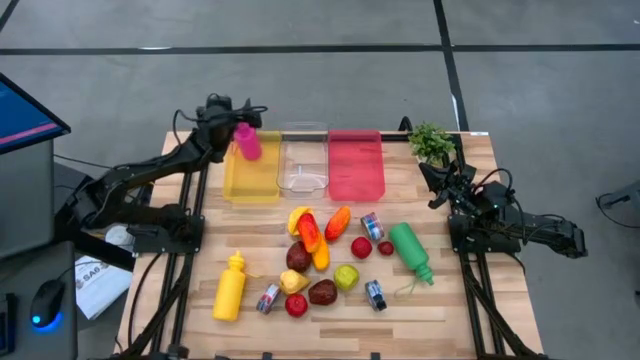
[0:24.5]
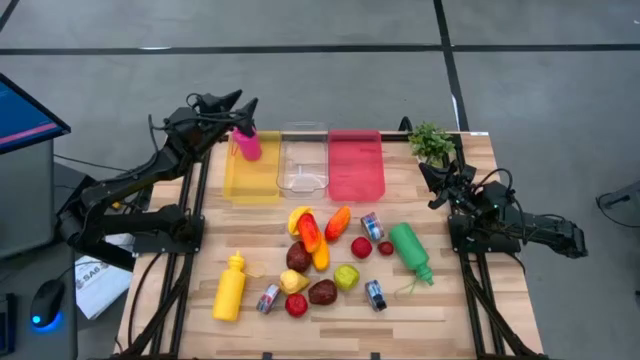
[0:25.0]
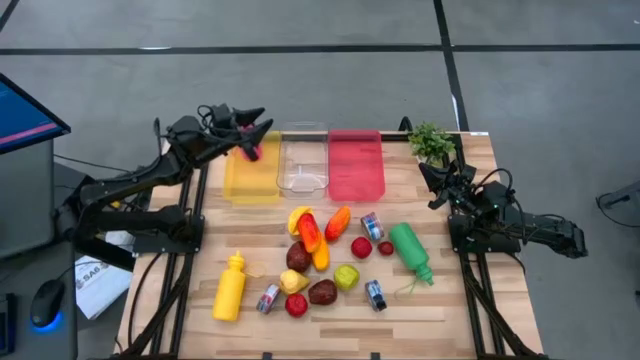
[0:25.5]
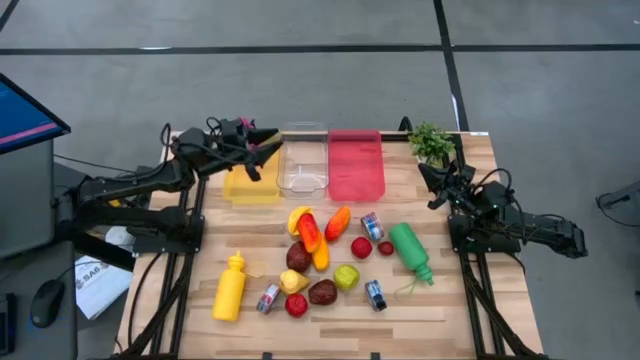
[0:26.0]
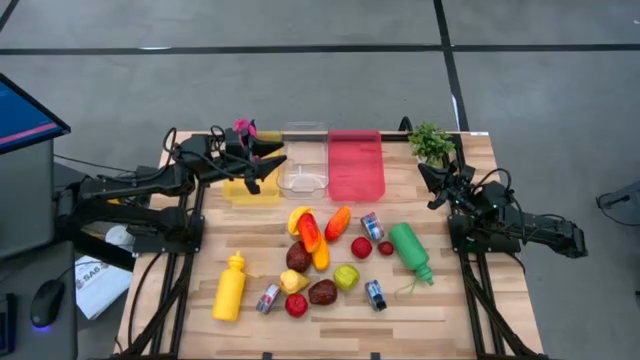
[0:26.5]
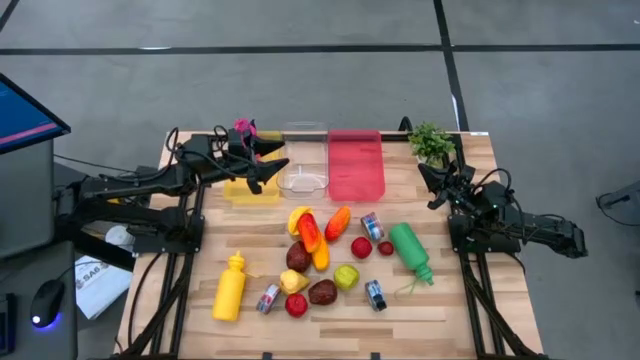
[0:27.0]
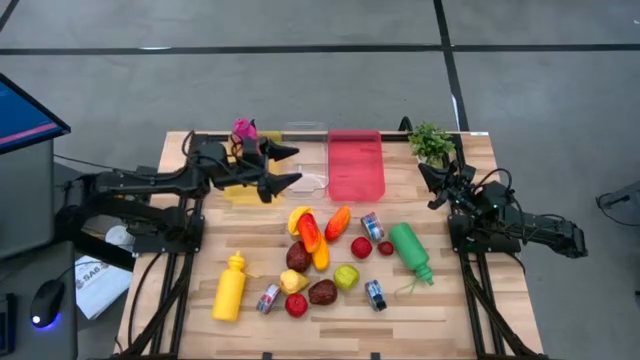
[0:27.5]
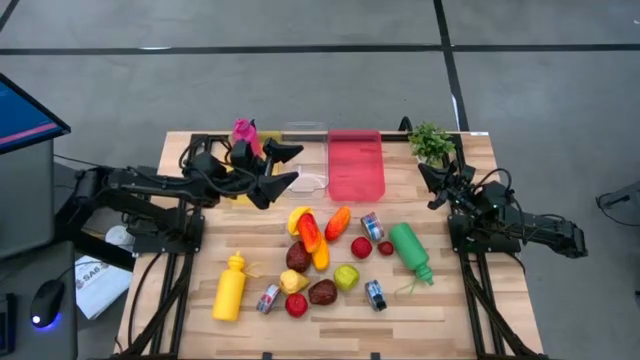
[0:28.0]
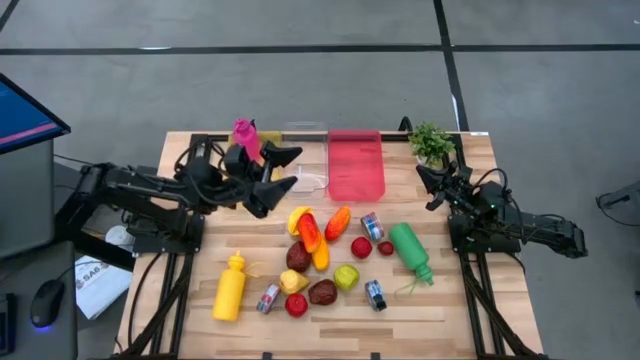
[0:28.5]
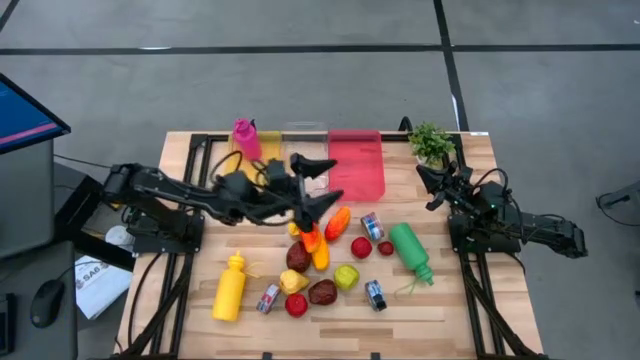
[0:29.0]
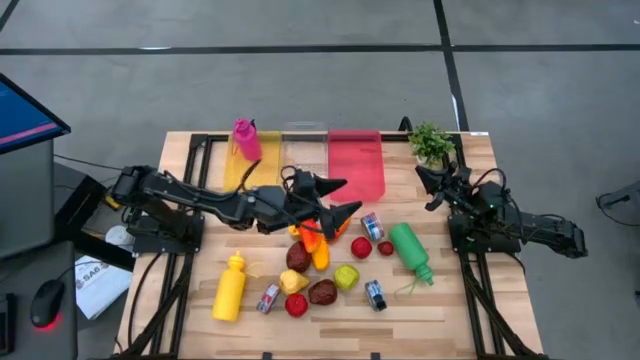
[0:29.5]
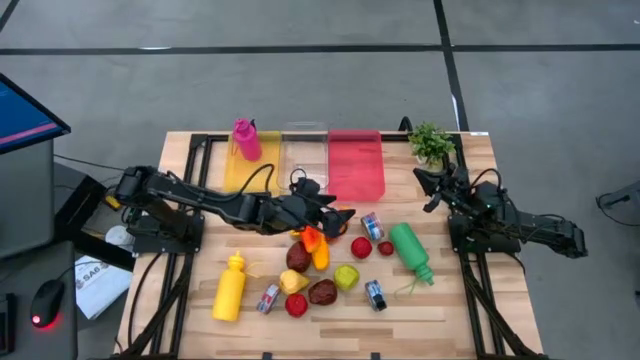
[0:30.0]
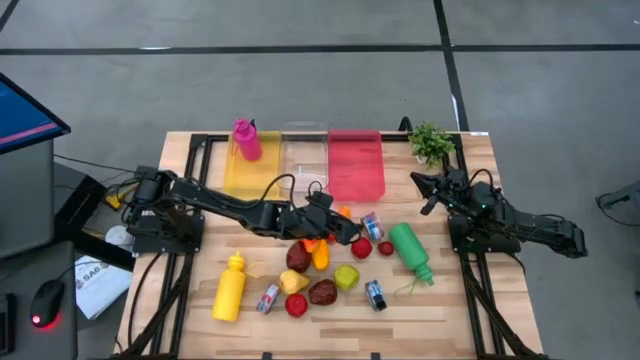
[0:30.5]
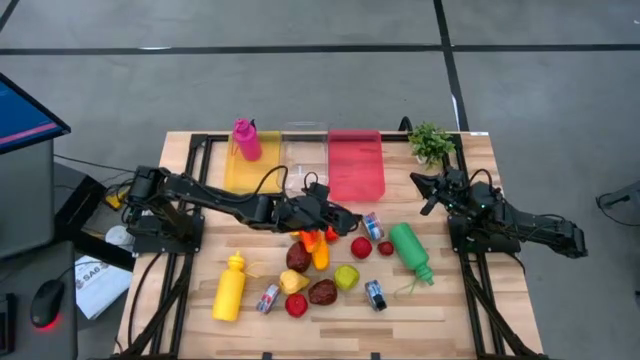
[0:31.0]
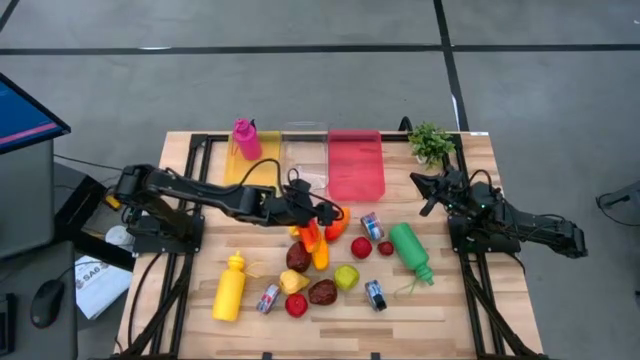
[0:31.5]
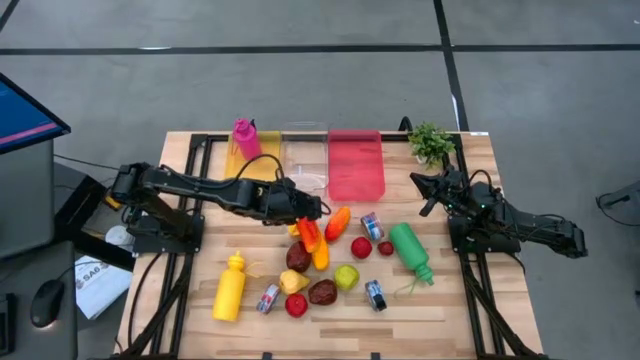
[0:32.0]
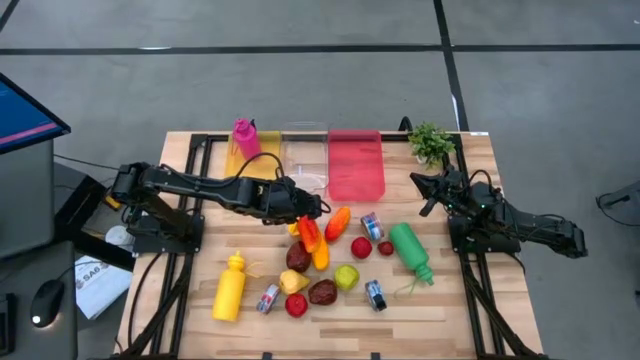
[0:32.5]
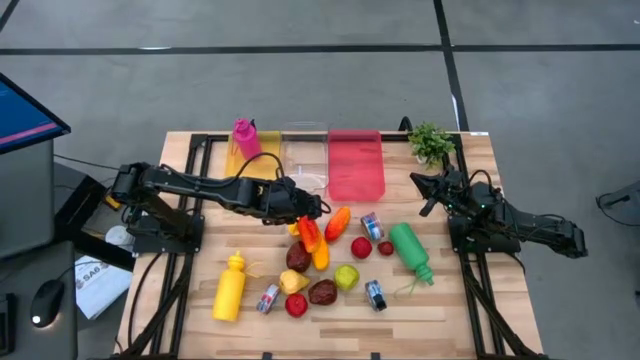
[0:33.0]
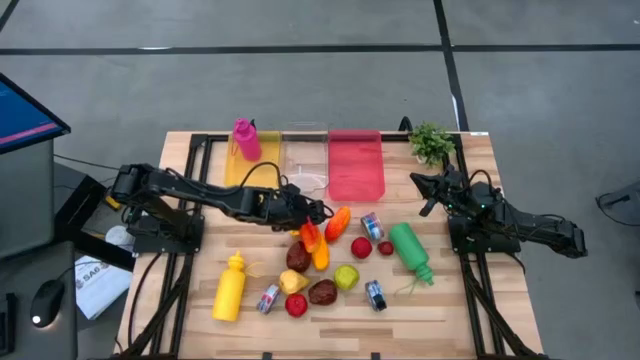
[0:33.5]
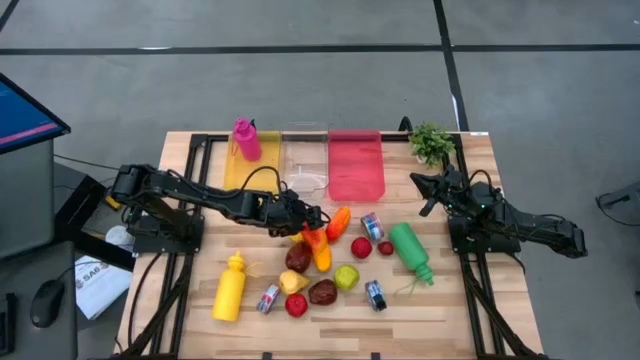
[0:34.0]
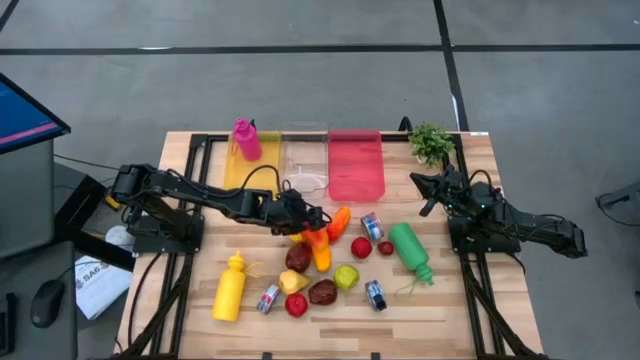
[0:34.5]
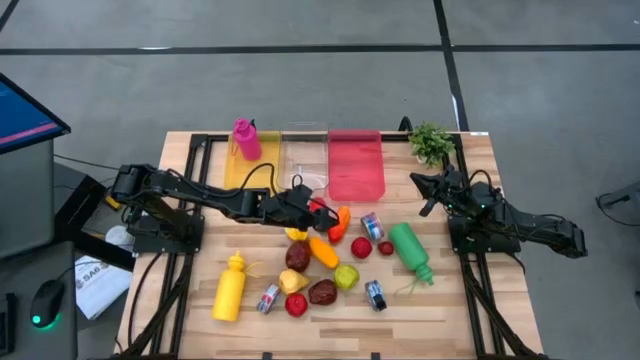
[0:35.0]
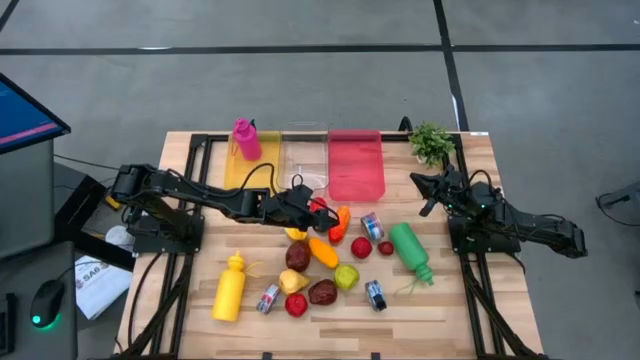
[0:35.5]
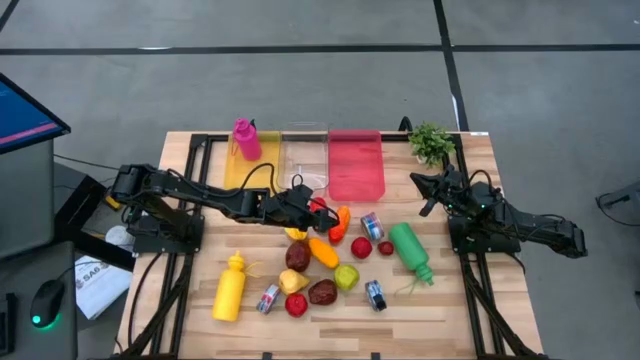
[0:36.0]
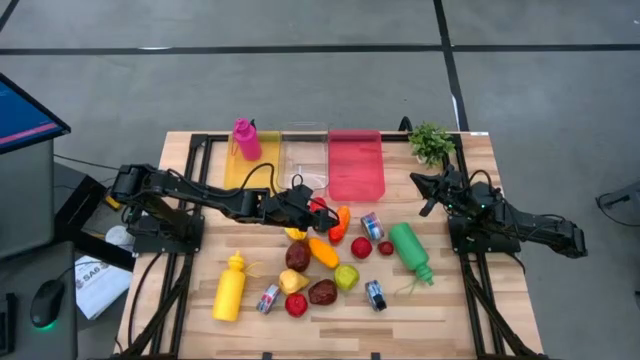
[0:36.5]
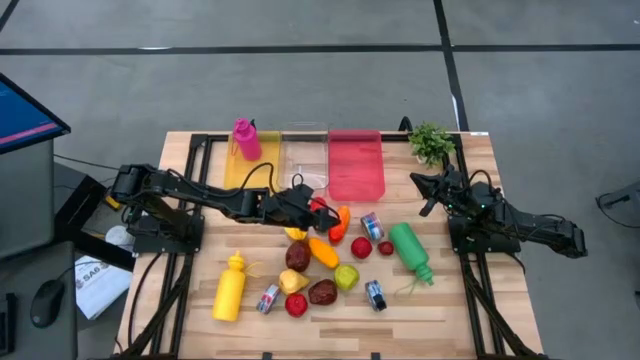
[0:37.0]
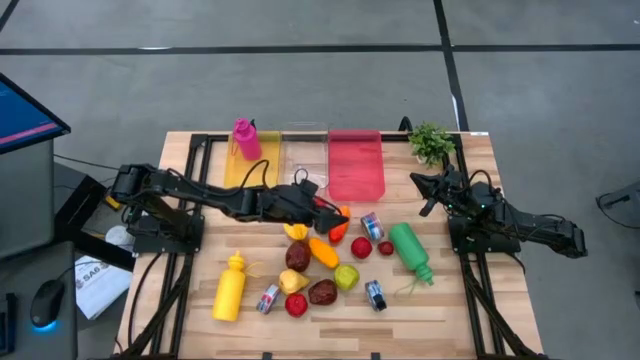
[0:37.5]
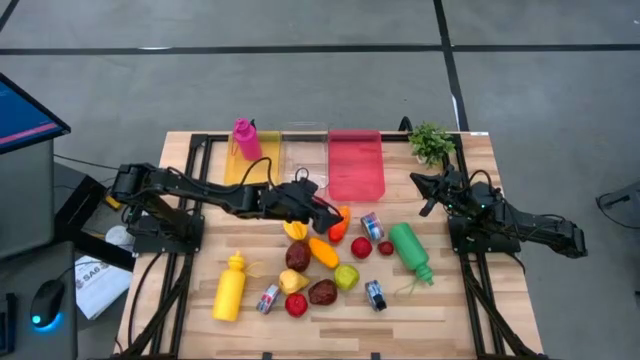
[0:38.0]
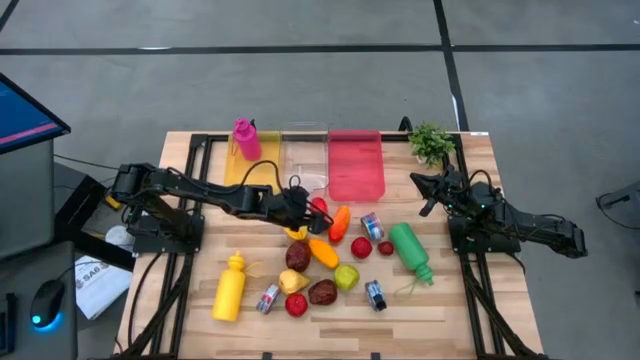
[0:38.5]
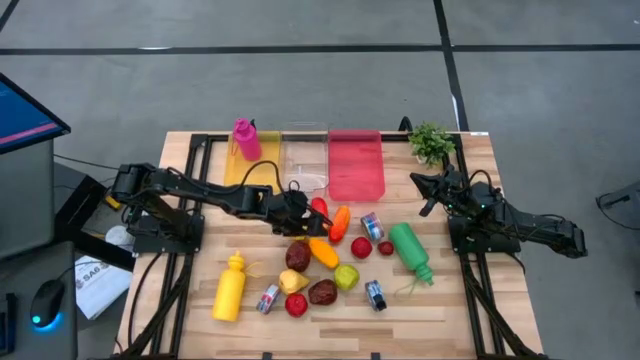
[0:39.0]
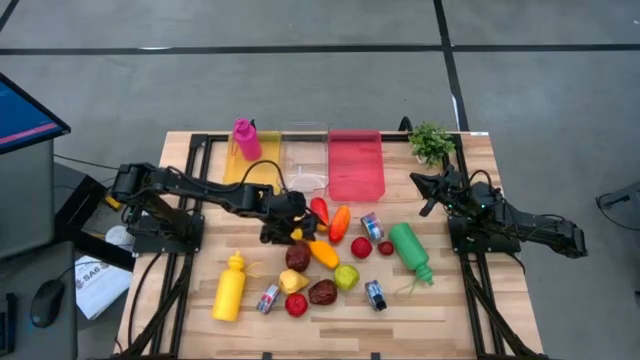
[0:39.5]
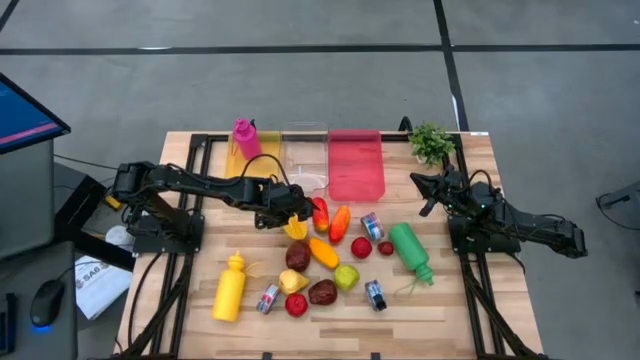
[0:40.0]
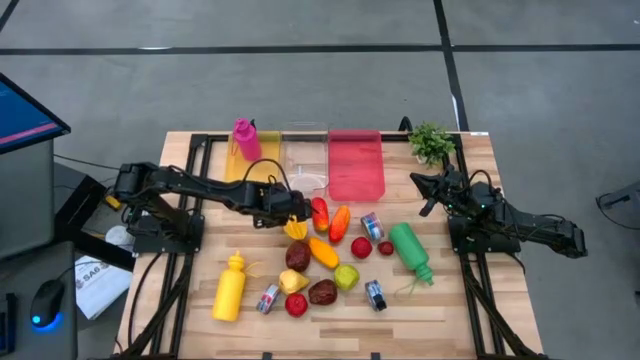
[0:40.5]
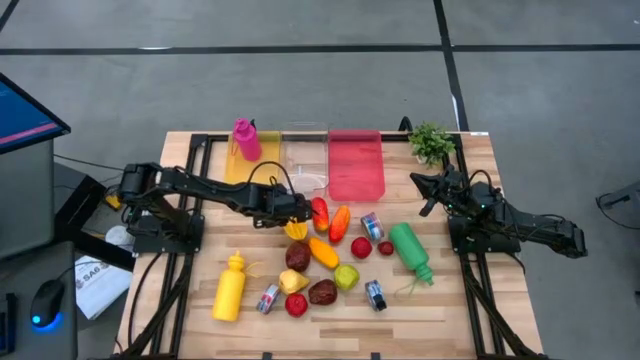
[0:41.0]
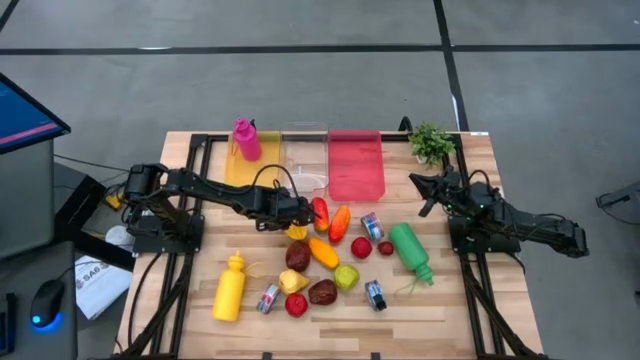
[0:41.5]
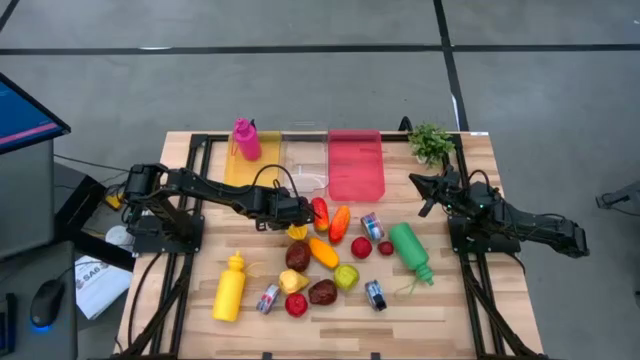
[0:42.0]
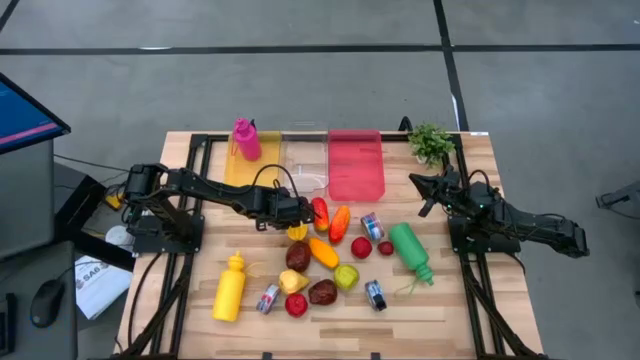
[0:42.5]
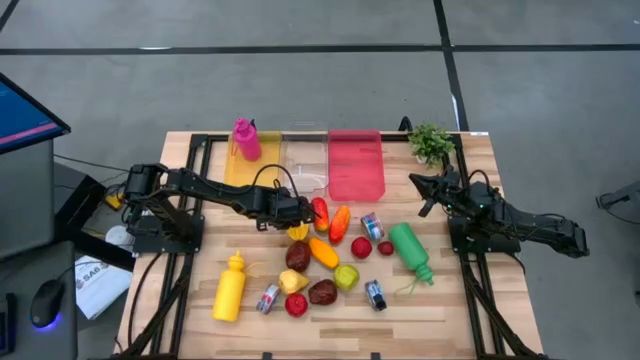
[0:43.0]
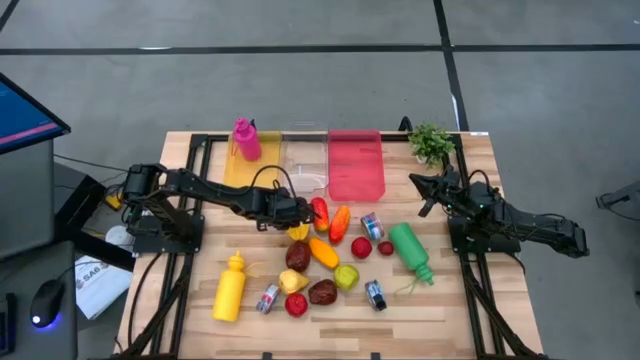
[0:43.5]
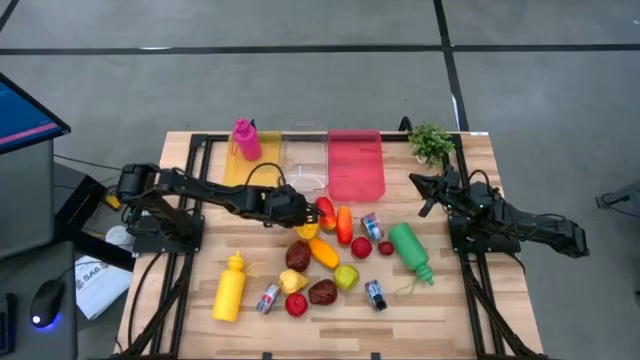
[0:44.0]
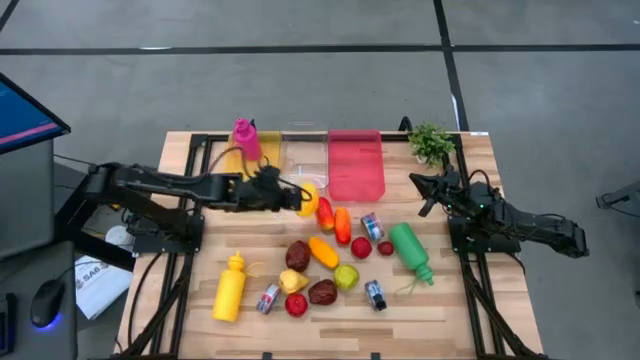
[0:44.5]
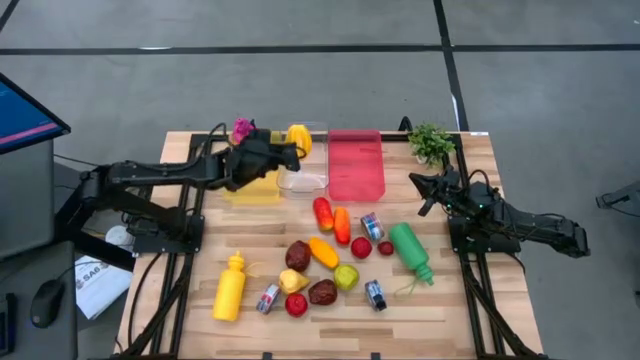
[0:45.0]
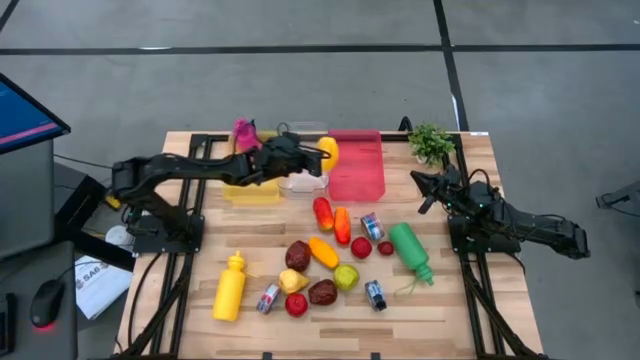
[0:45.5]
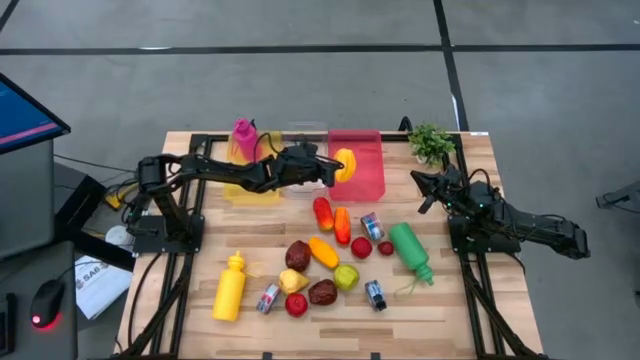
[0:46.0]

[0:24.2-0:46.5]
Task: Pick & Place Food Item
Put the yellow starfruit into the pink bin
